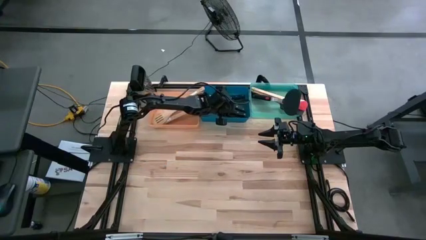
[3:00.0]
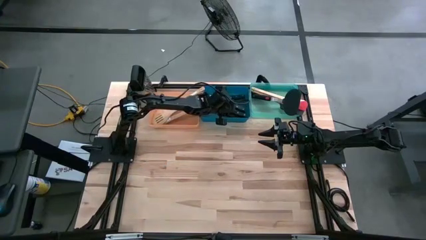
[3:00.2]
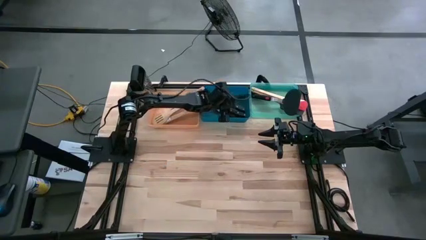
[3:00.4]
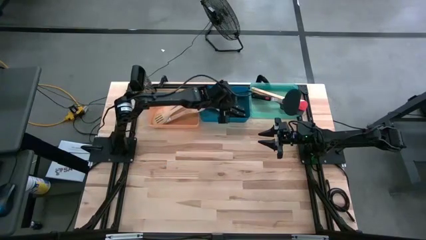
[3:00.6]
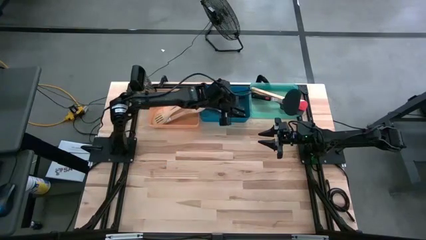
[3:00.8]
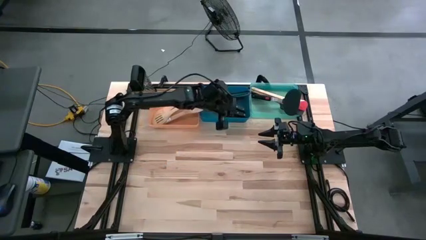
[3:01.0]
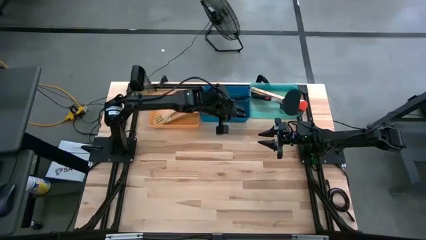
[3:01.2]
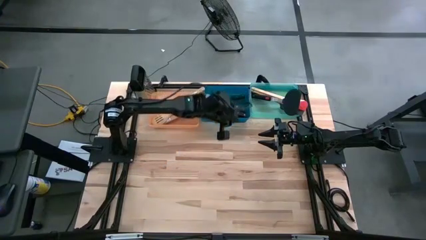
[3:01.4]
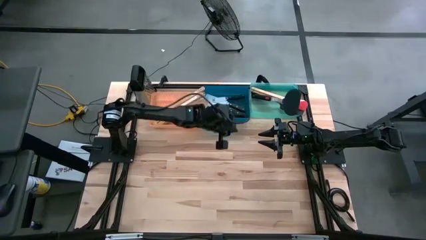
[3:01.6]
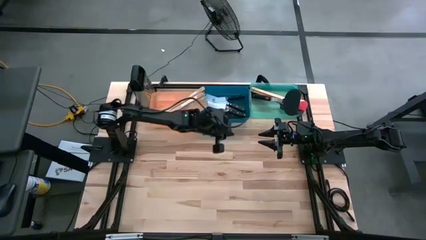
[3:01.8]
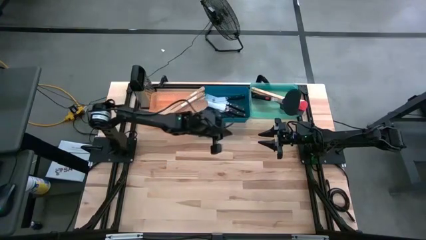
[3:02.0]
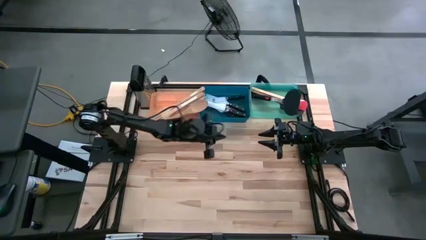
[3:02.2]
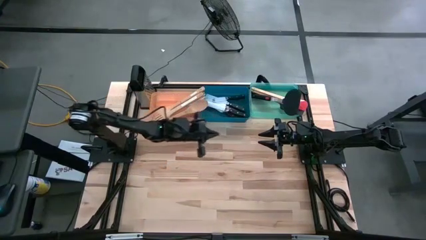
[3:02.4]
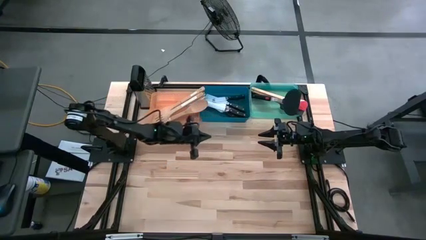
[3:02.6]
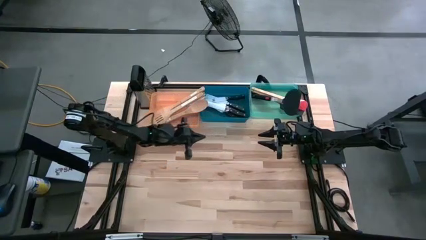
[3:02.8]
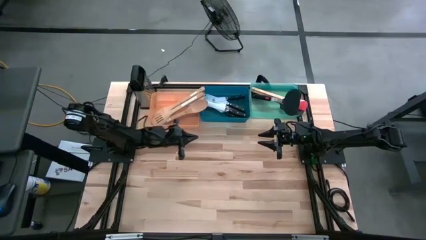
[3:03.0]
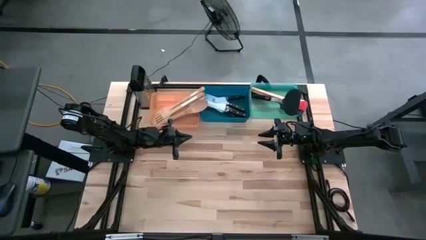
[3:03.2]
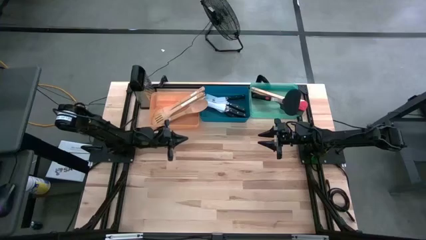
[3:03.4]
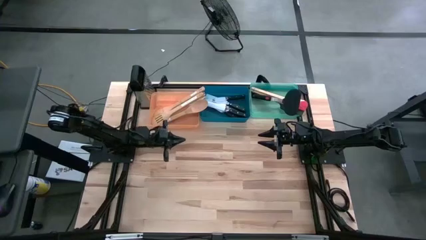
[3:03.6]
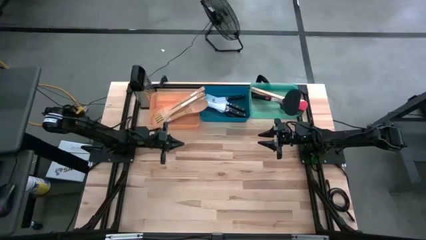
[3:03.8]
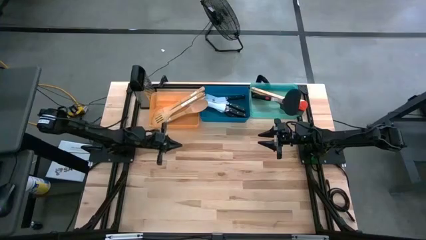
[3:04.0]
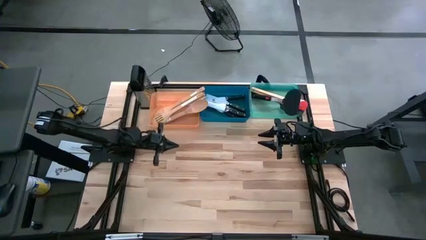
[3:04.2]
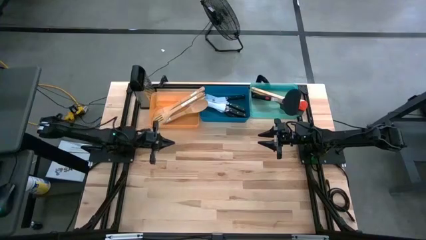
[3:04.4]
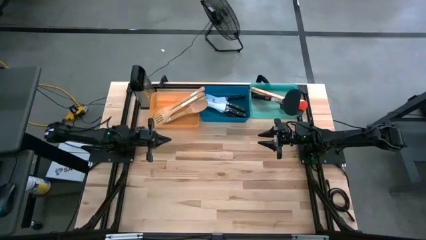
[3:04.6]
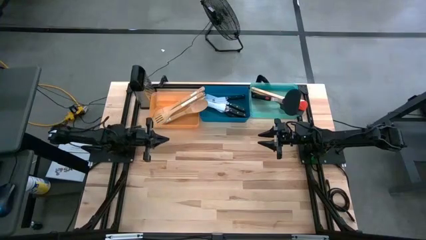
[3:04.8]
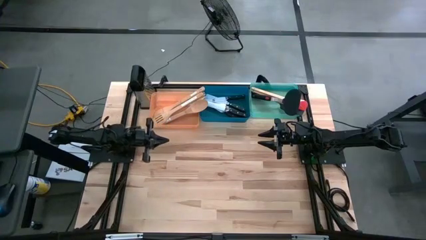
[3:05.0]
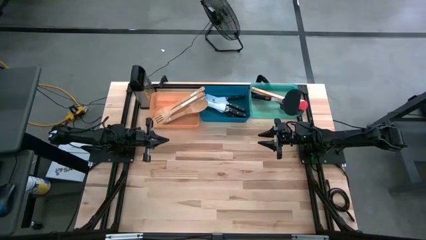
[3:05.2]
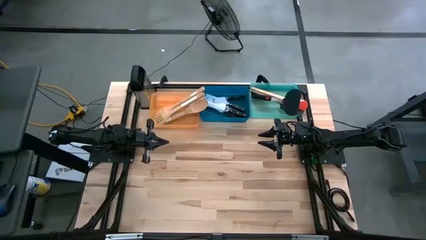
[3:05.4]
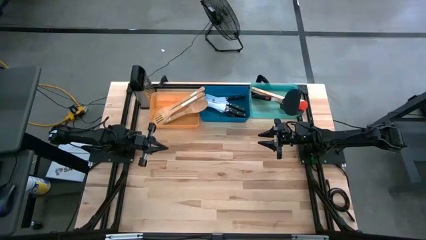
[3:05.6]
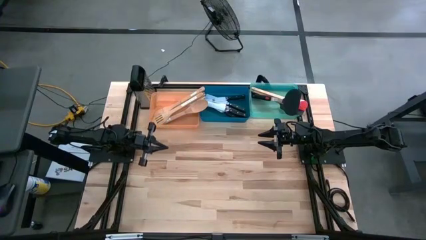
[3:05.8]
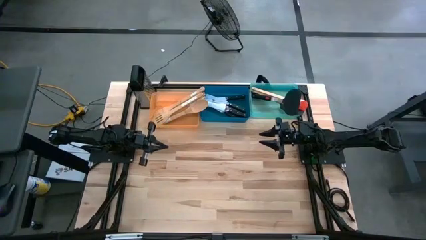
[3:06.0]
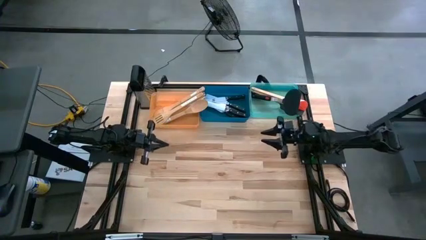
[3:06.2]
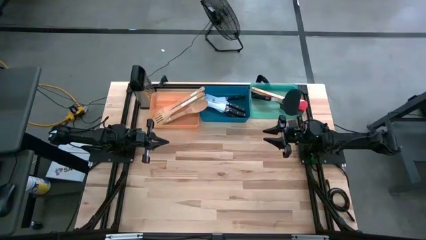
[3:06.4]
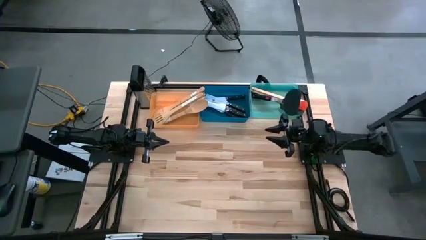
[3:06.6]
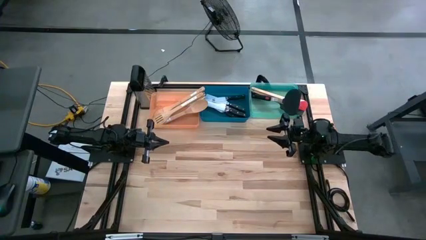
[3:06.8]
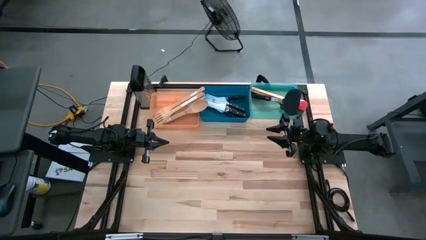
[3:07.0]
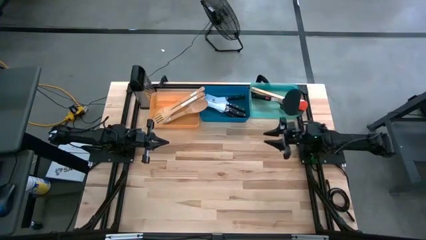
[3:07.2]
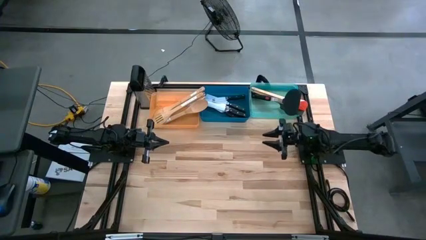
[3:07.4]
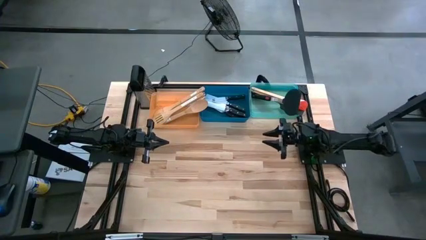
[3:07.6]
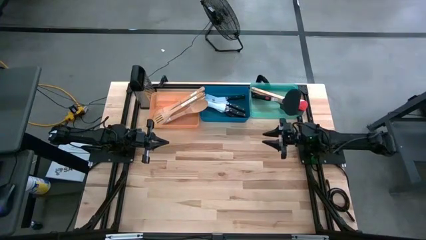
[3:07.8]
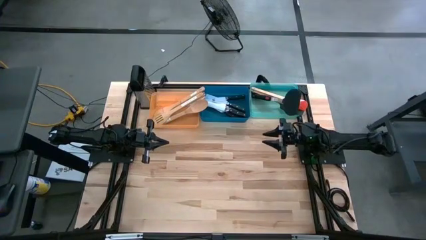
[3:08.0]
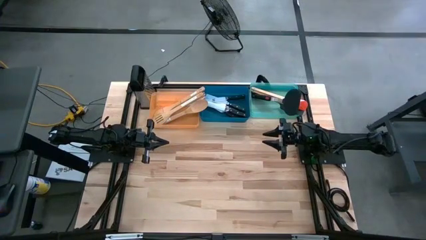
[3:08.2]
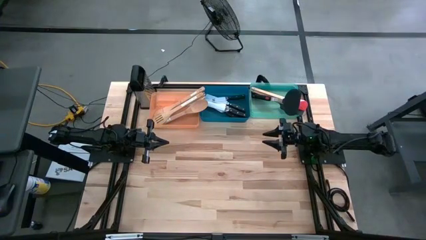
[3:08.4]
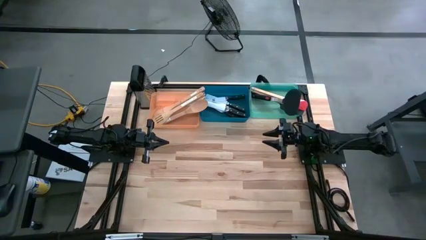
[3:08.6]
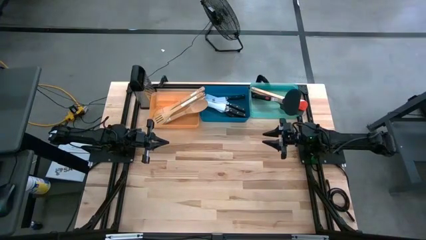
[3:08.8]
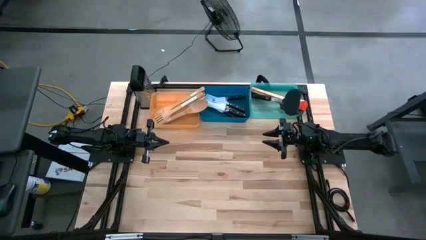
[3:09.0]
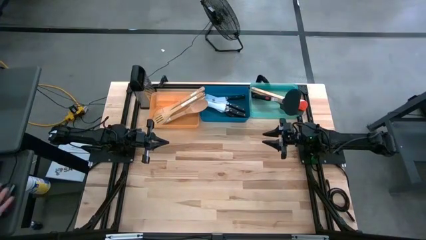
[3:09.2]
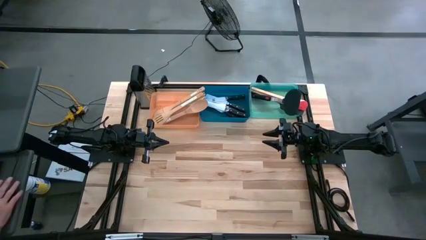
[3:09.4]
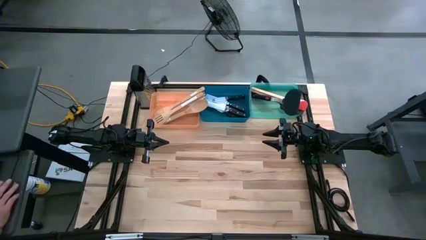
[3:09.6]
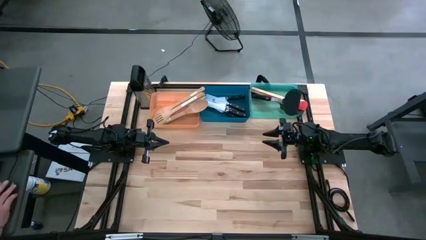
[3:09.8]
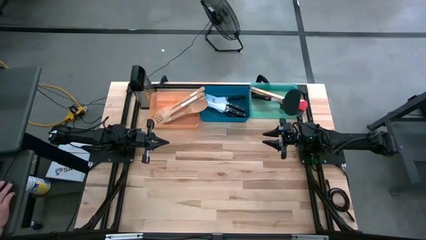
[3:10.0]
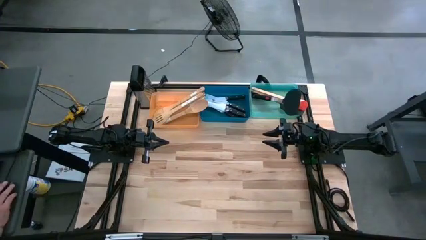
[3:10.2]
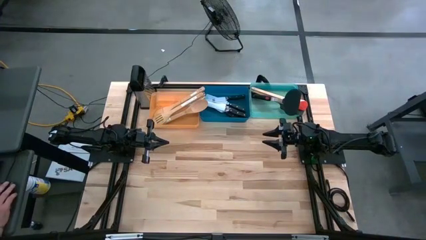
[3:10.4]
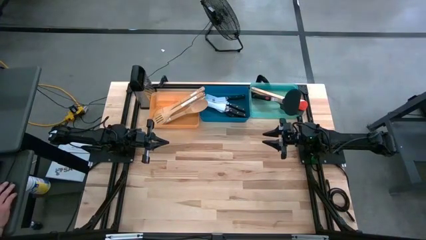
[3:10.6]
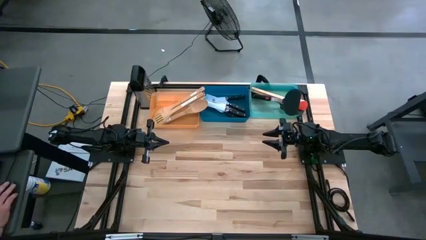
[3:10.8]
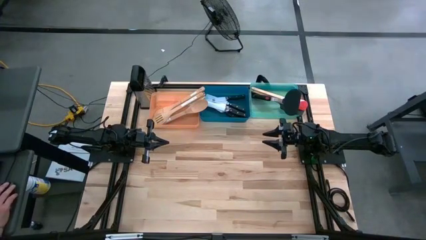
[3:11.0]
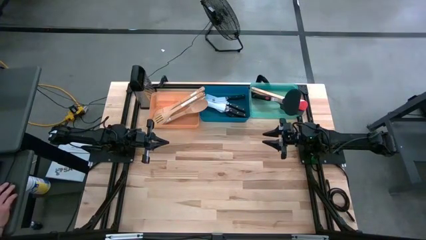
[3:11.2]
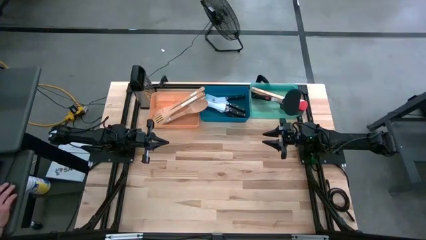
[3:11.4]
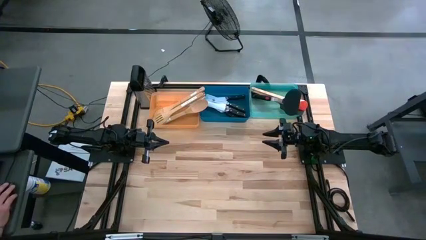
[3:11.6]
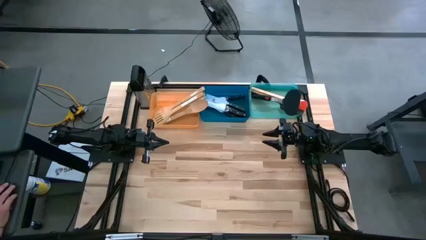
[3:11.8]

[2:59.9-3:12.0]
Task: Pick & Place Kitchen Items
Return to Home Position

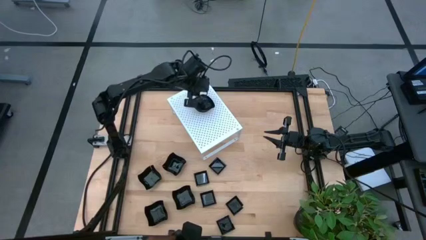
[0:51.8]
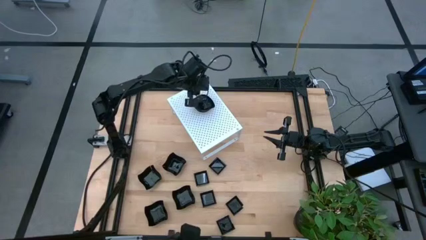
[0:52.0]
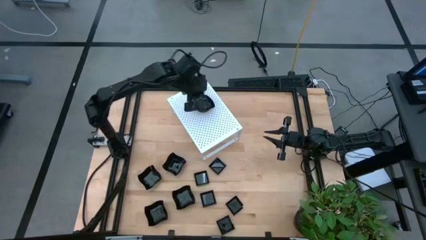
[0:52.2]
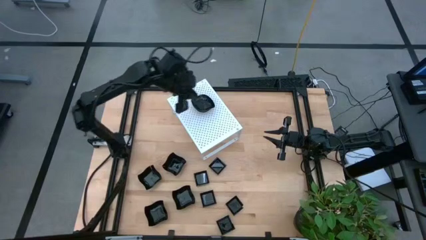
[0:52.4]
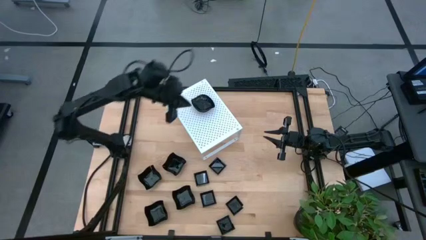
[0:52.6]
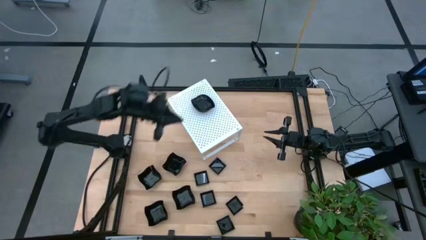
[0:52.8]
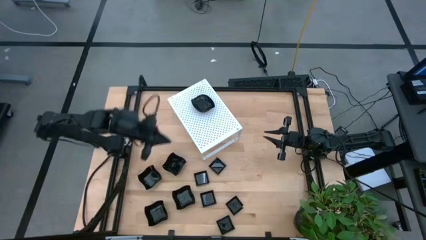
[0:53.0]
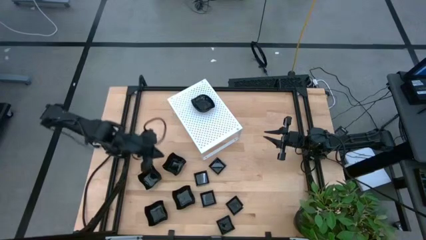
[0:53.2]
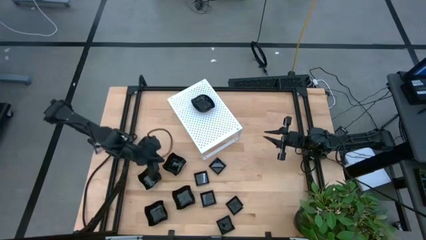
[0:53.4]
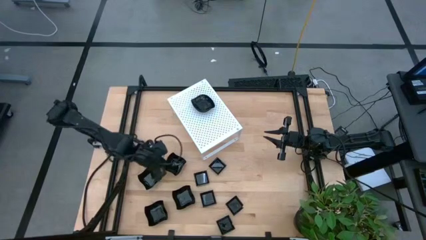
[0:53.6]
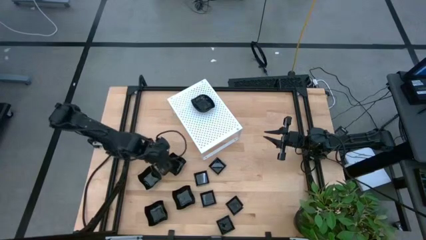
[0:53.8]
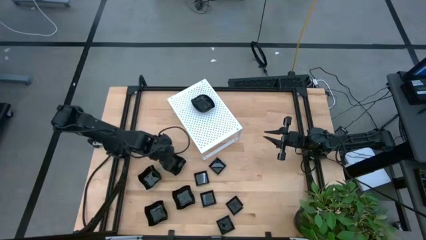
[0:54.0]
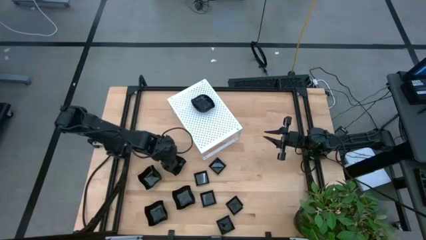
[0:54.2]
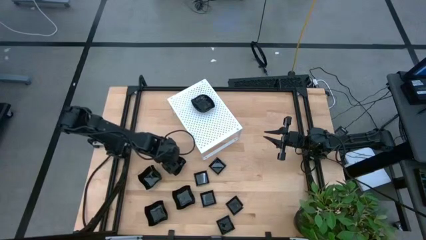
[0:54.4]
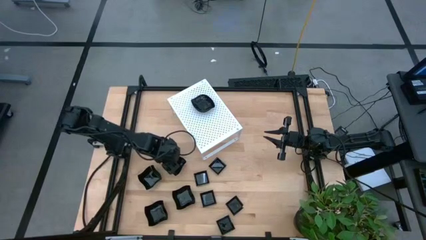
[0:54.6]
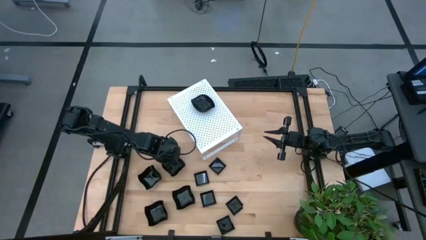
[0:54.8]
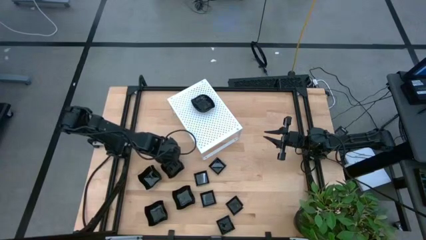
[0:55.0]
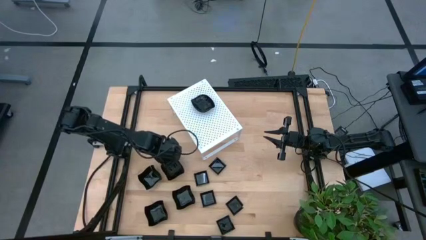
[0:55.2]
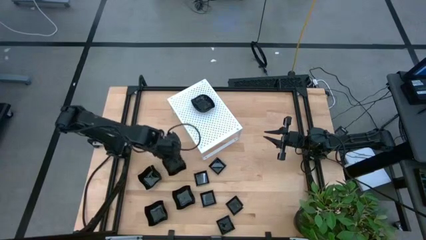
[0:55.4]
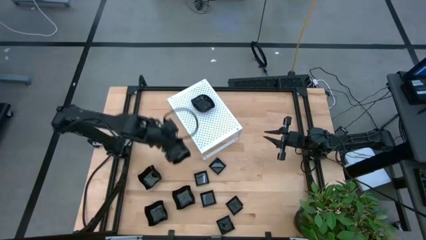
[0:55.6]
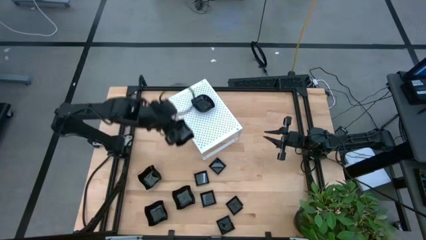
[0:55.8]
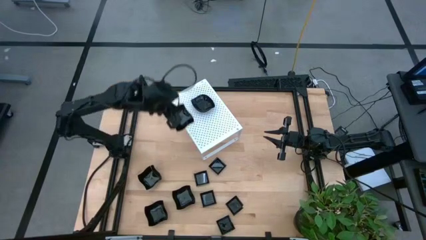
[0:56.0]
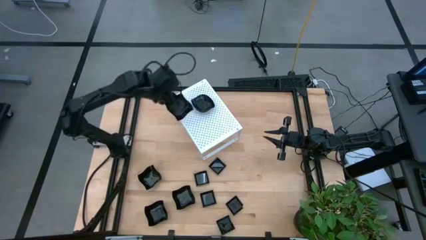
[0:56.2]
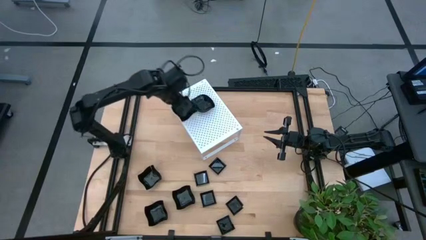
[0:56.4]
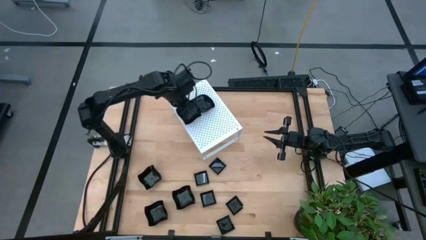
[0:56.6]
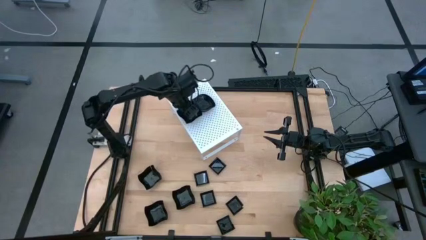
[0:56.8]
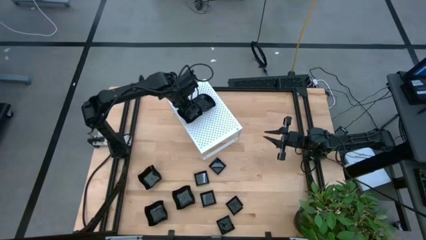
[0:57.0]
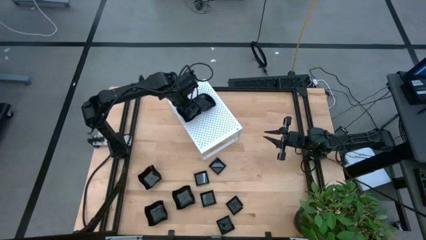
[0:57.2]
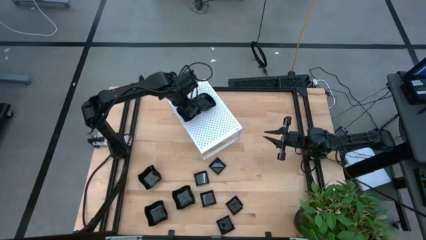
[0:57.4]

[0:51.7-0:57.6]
Task: Pick & Place Mini shaped plates
Put the distorted square plate on the shelf
